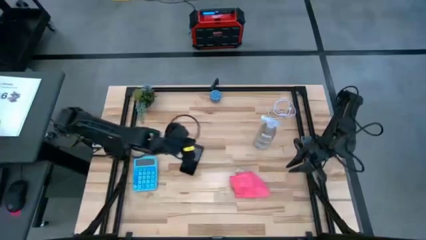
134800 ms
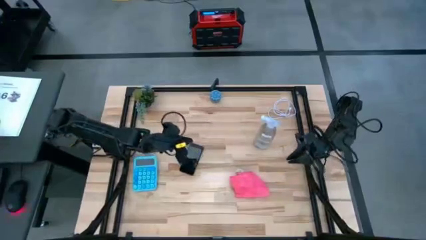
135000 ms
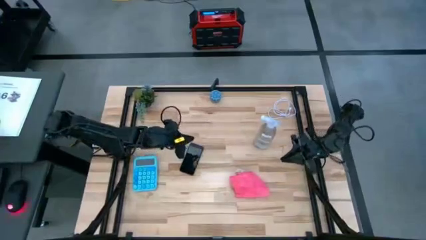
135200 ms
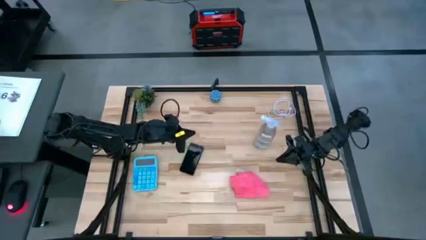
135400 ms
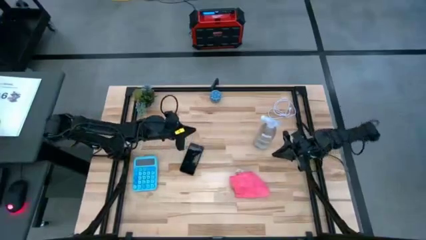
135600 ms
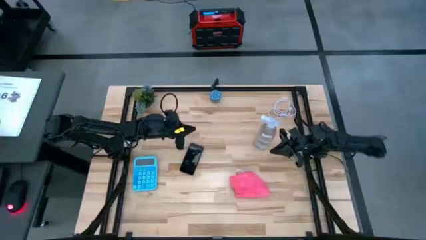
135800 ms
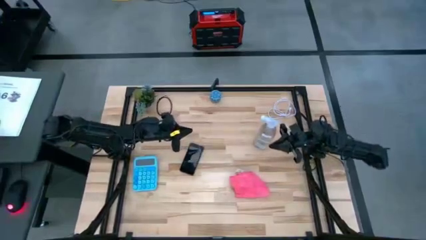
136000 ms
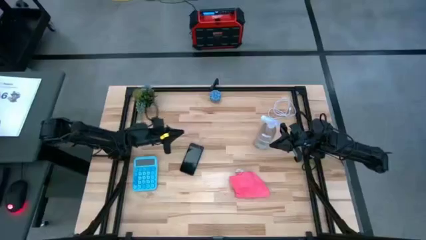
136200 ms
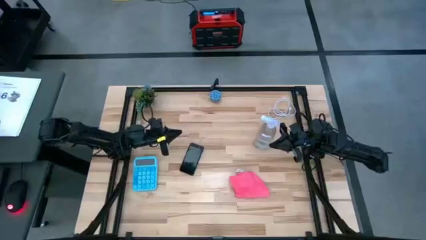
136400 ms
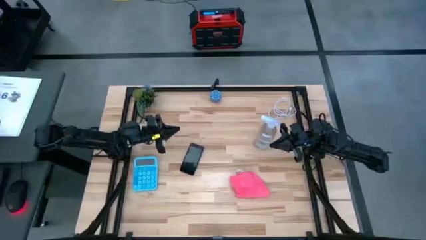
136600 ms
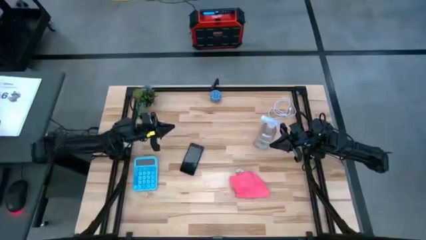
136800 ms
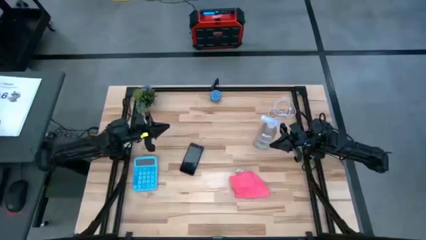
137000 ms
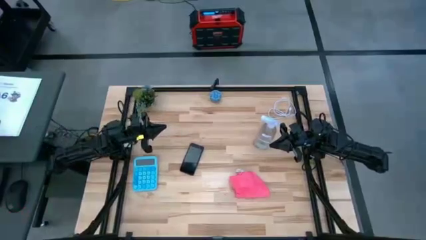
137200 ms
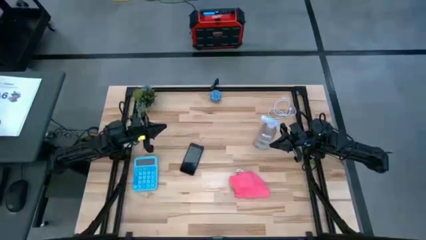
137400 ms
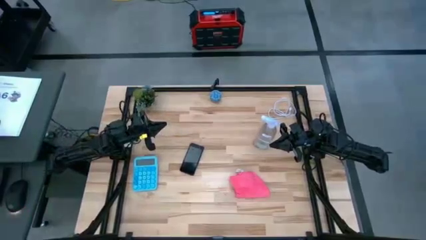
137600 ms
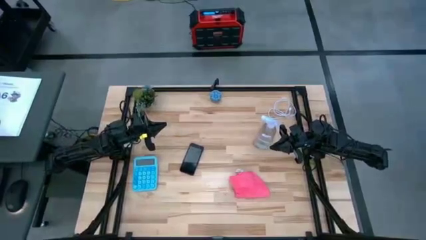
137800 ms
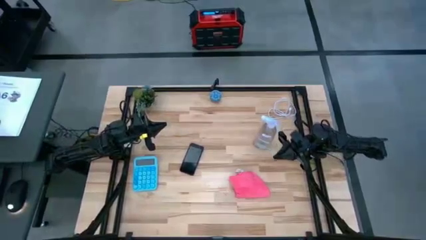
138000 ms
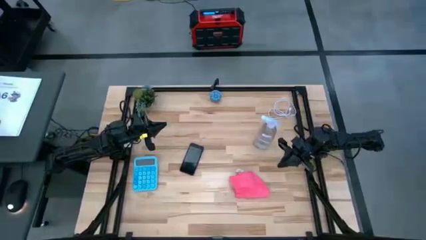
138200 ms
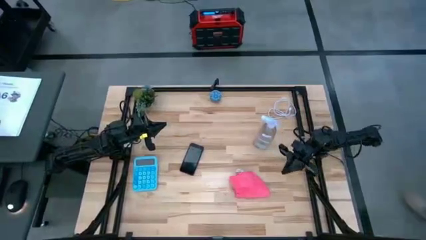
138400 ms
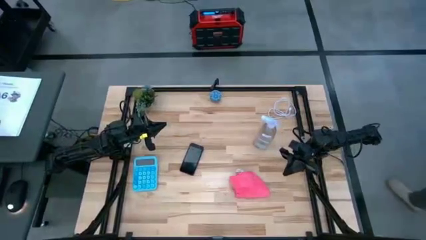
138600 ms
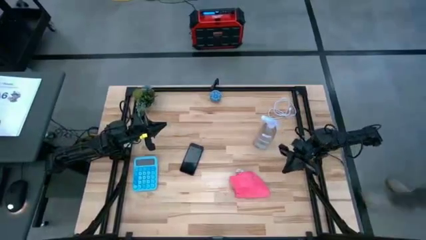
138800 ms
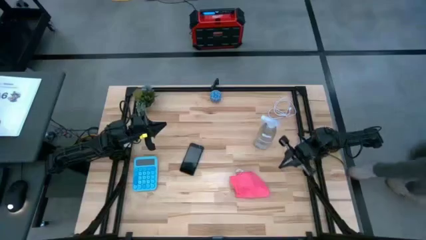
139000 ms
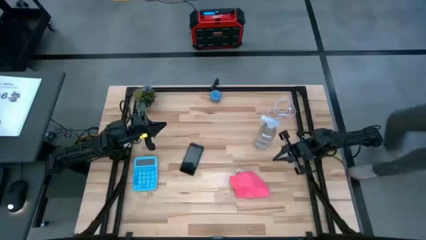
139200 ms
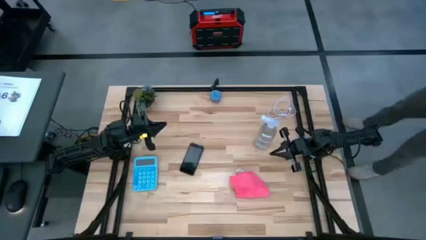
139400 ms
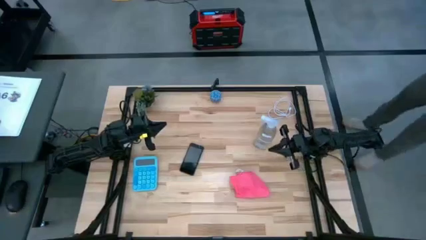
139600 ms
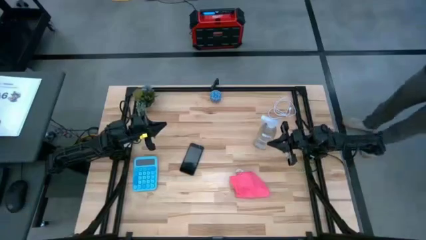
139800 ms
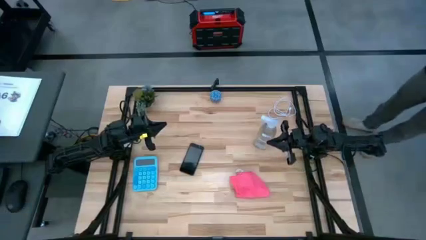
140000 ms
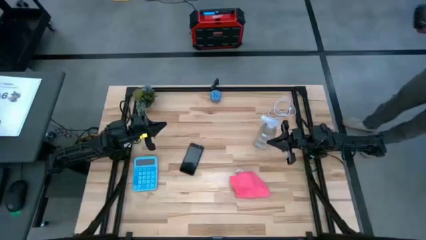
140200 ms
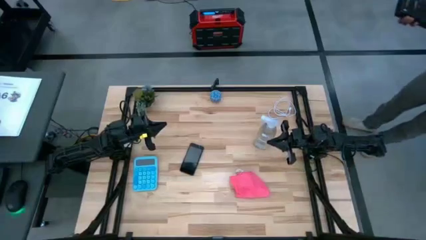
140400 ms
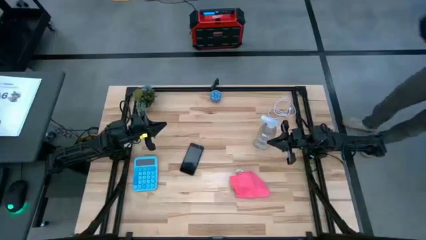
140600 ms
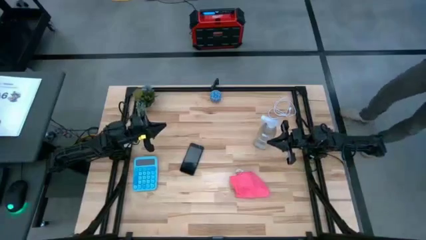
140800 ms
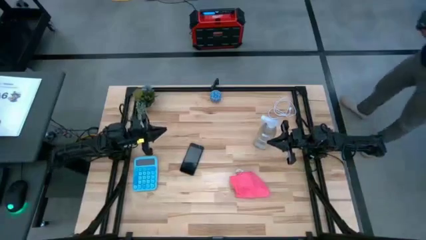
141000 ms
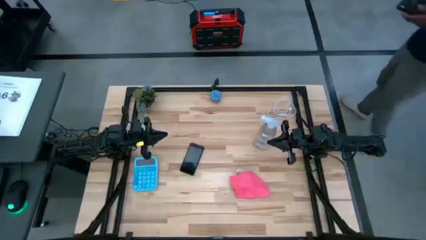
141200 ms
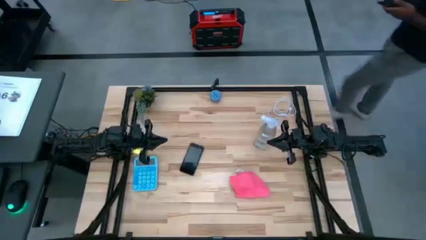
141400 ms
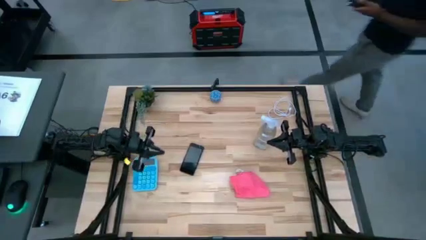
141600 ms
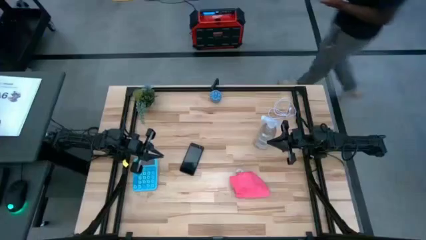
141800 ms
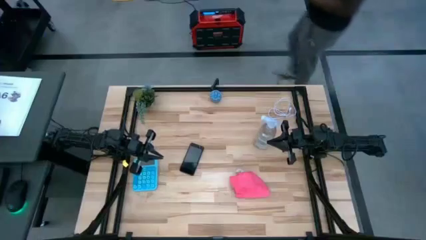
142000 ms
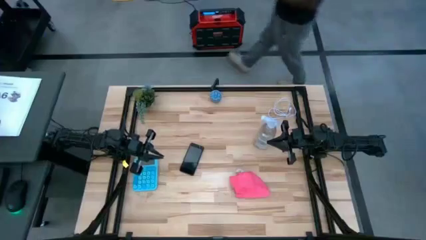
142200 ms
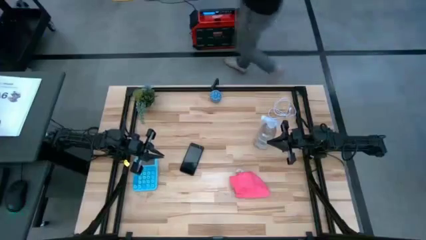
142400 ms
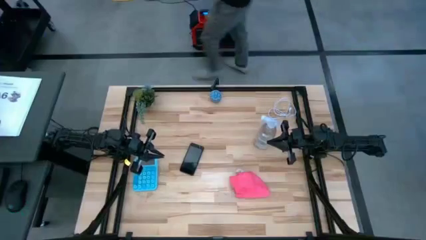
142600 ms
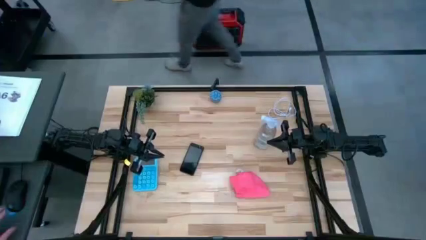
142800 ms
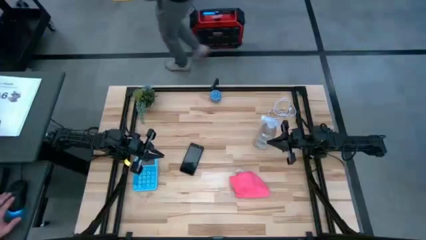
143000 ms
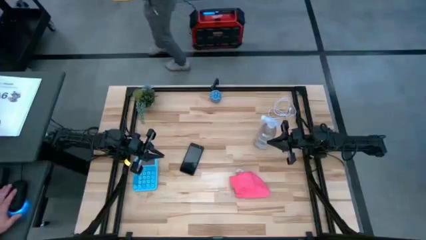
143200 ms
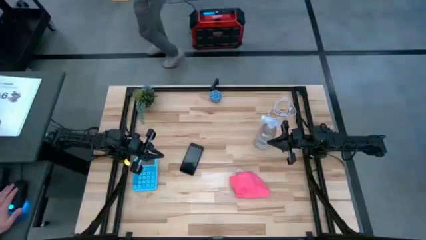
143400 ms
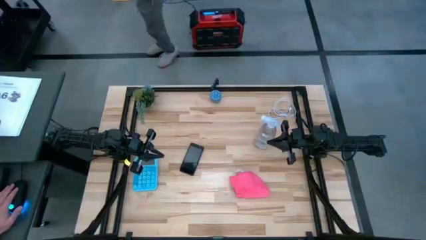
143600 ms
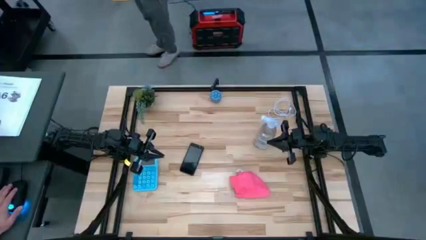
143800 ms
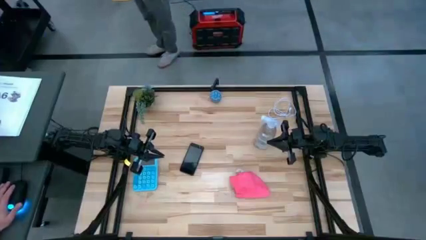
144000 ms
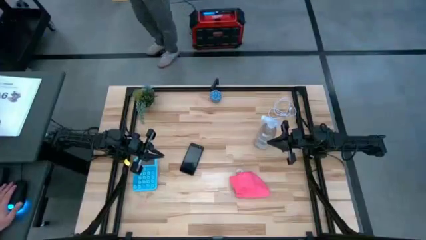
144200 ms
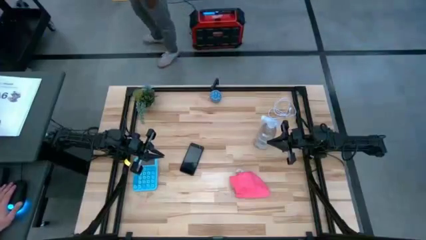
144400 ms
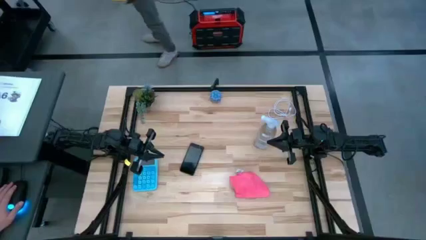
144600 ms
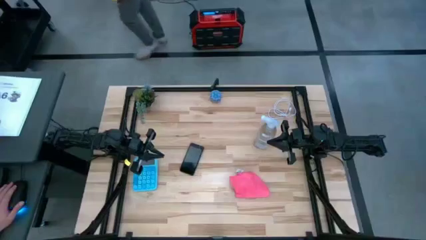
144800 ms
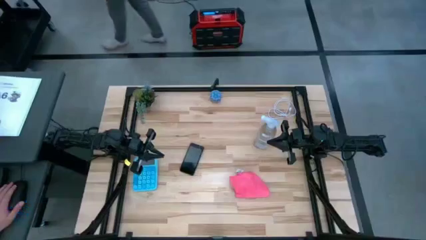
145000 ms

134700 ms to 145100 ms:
Task: Apply microfiber cloth
Return to Home Position
